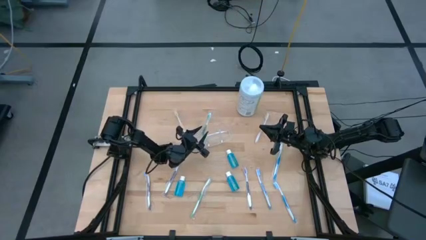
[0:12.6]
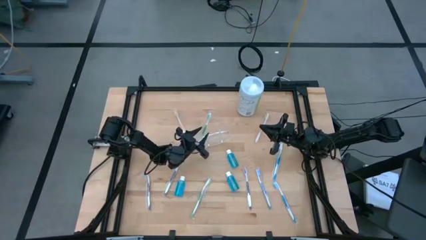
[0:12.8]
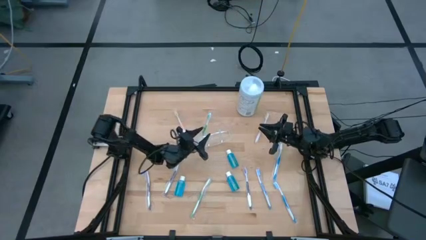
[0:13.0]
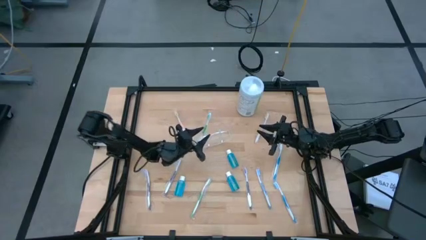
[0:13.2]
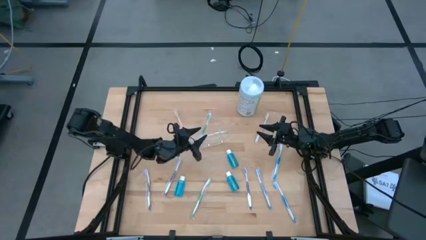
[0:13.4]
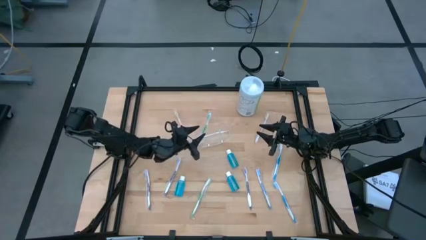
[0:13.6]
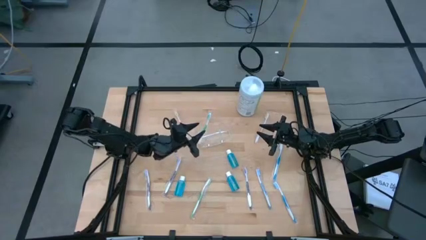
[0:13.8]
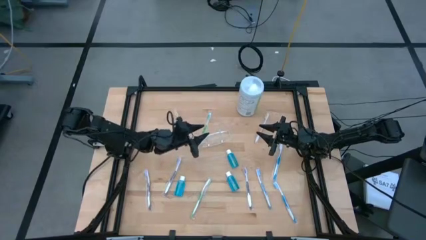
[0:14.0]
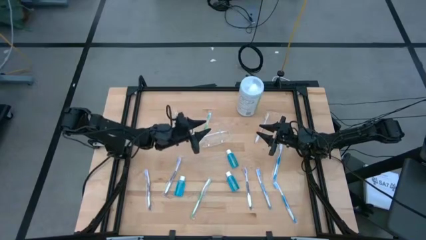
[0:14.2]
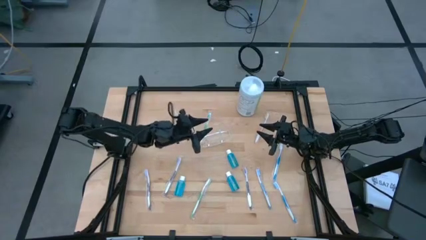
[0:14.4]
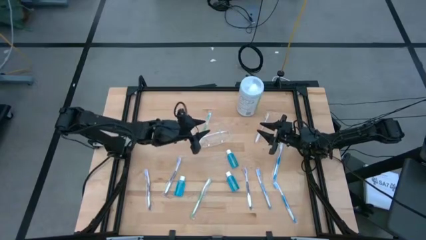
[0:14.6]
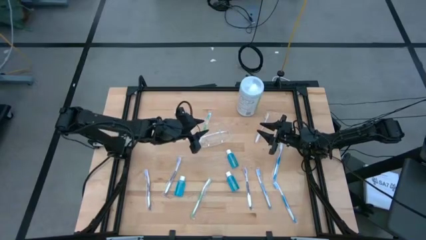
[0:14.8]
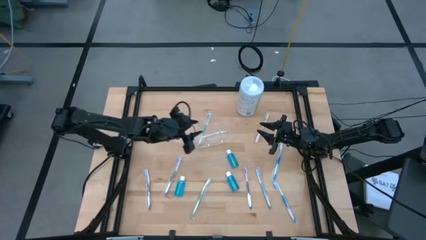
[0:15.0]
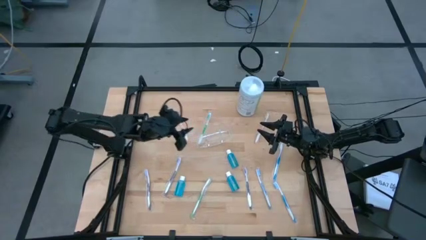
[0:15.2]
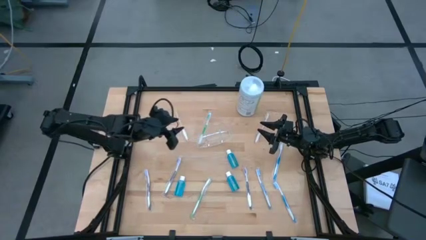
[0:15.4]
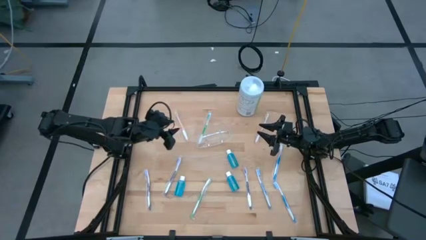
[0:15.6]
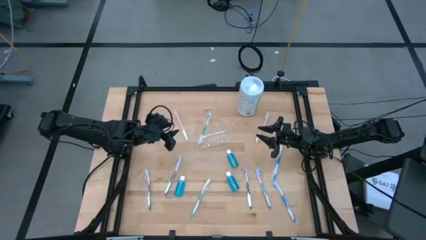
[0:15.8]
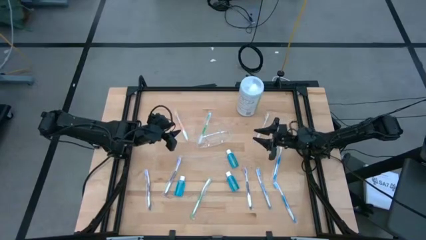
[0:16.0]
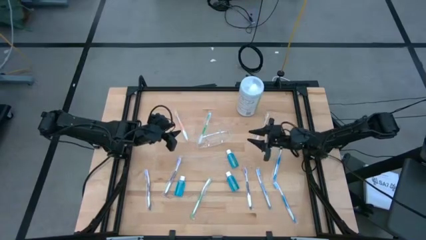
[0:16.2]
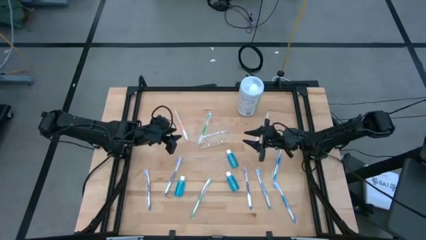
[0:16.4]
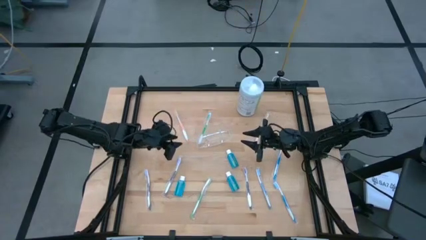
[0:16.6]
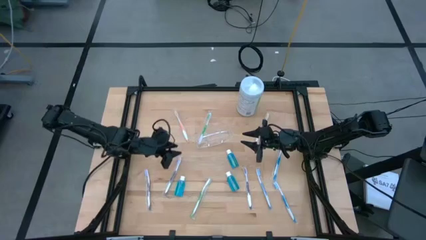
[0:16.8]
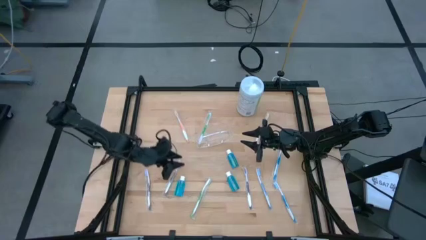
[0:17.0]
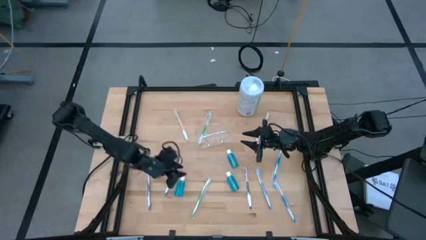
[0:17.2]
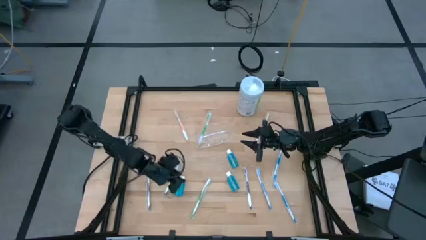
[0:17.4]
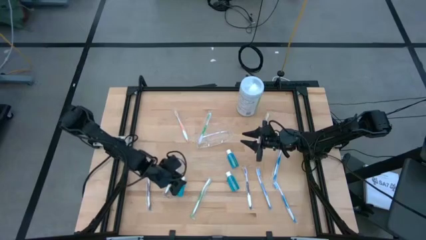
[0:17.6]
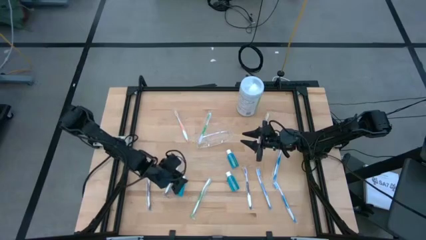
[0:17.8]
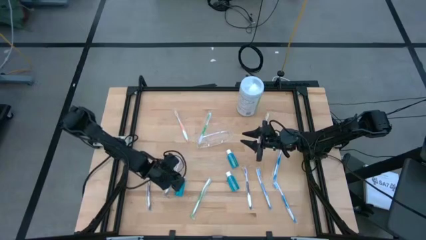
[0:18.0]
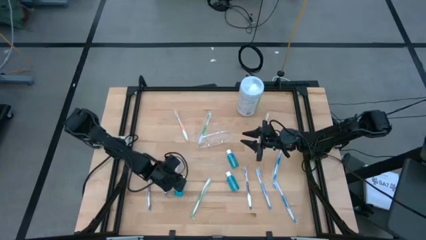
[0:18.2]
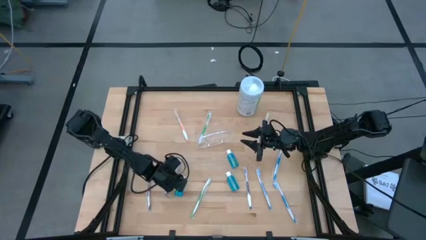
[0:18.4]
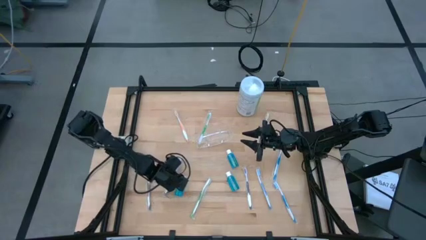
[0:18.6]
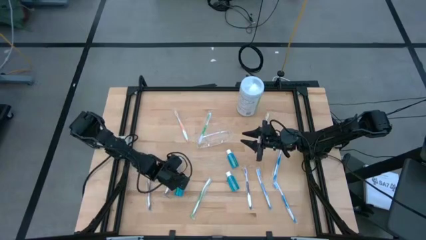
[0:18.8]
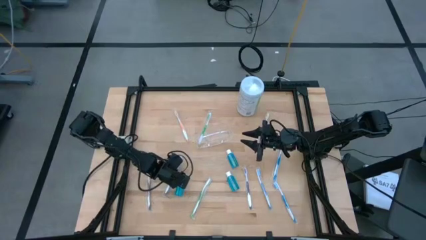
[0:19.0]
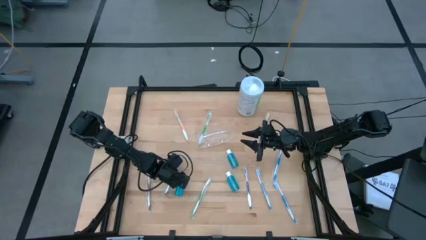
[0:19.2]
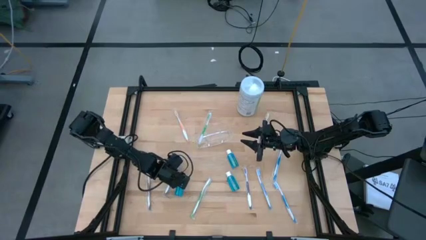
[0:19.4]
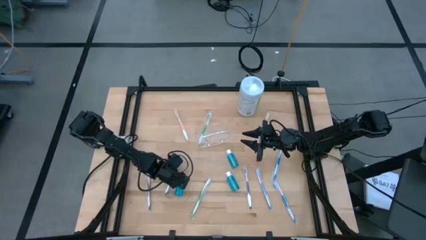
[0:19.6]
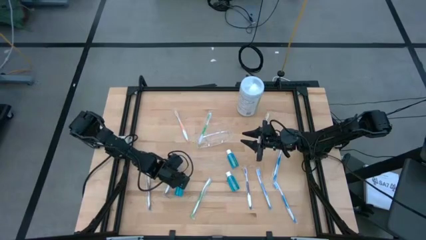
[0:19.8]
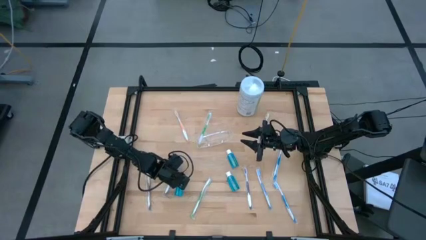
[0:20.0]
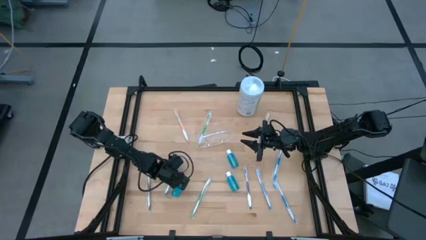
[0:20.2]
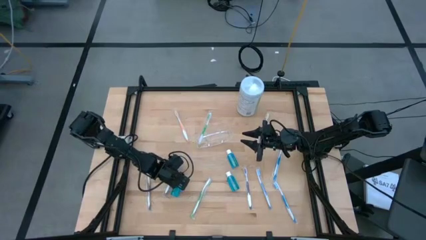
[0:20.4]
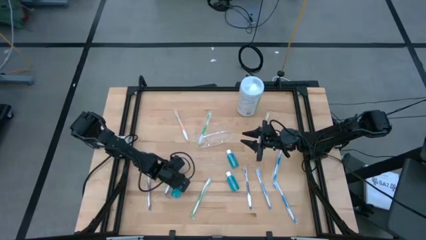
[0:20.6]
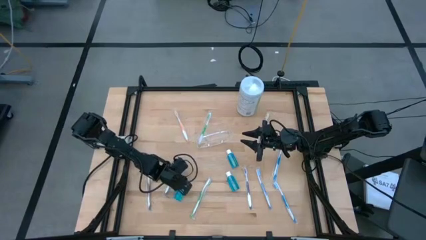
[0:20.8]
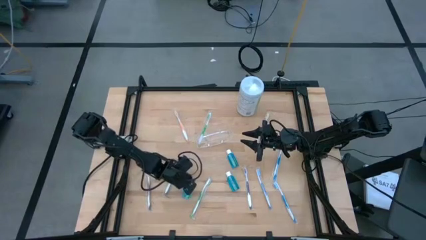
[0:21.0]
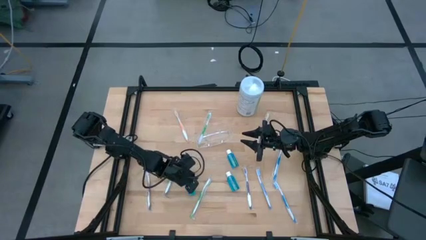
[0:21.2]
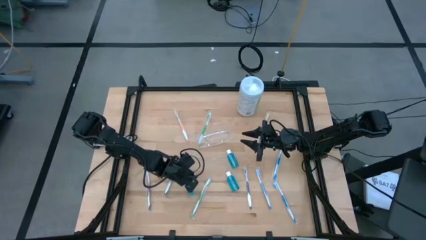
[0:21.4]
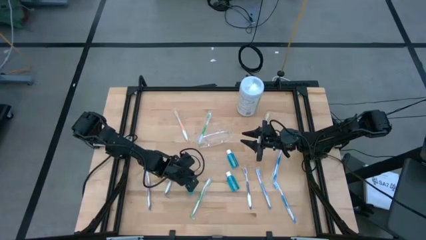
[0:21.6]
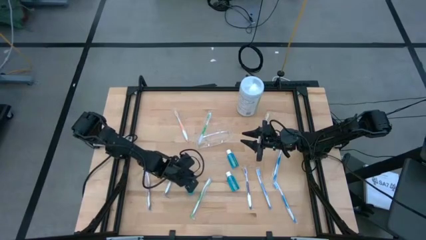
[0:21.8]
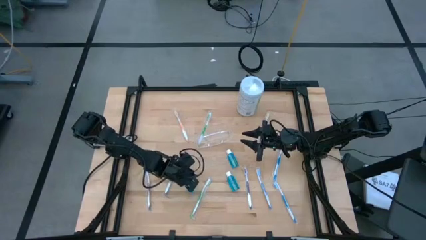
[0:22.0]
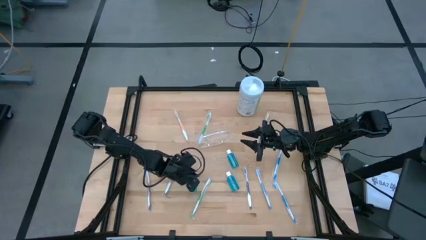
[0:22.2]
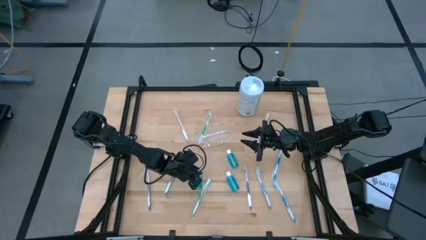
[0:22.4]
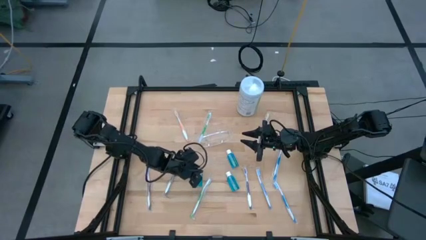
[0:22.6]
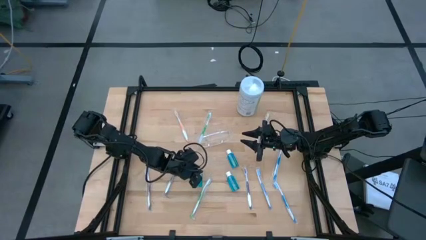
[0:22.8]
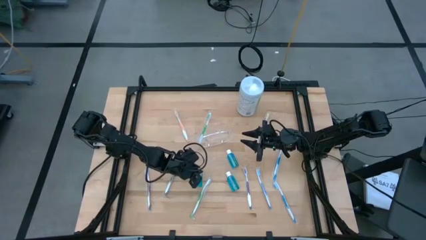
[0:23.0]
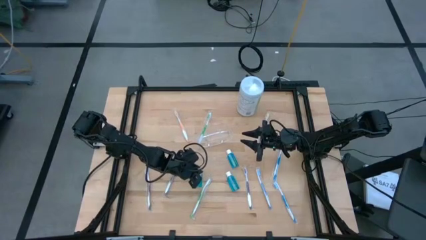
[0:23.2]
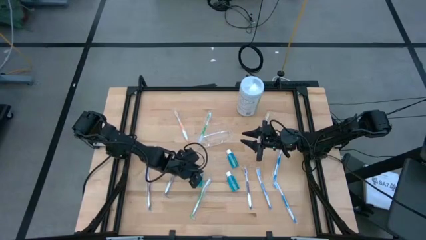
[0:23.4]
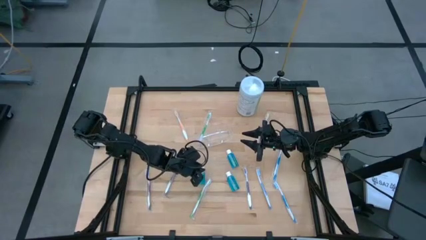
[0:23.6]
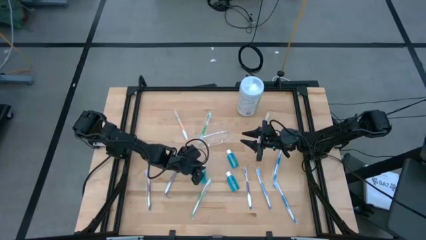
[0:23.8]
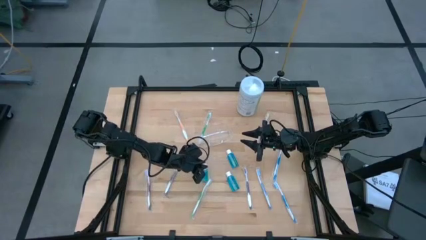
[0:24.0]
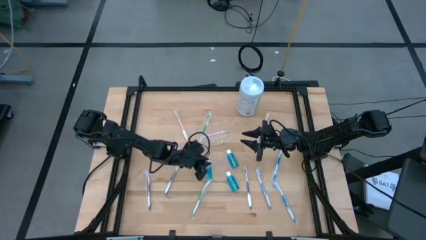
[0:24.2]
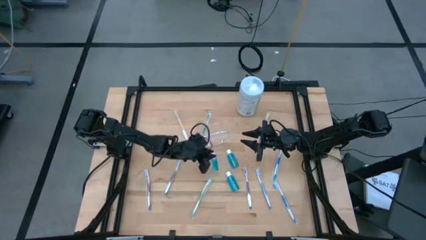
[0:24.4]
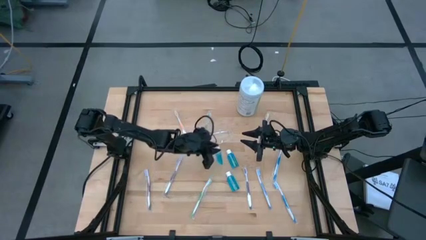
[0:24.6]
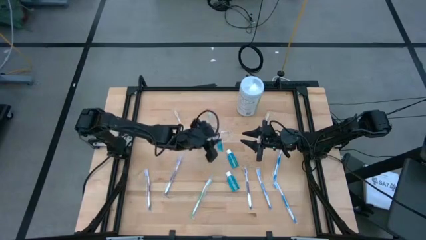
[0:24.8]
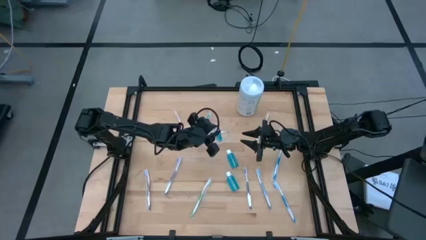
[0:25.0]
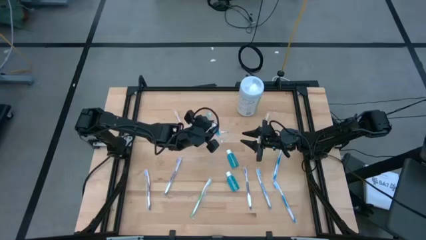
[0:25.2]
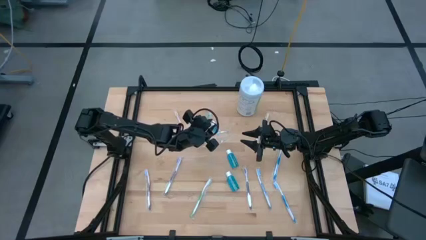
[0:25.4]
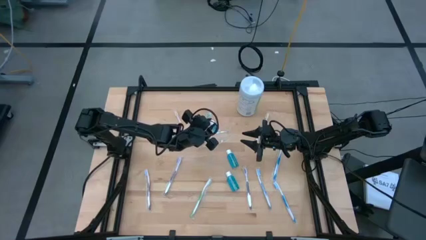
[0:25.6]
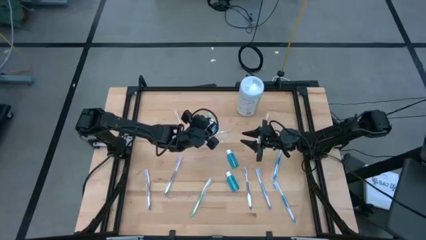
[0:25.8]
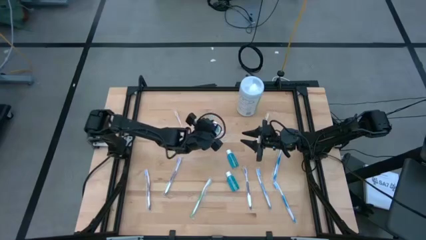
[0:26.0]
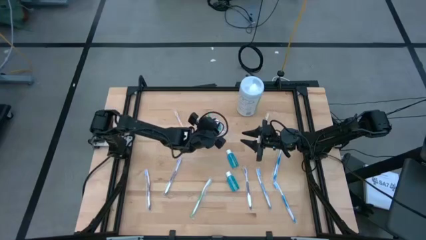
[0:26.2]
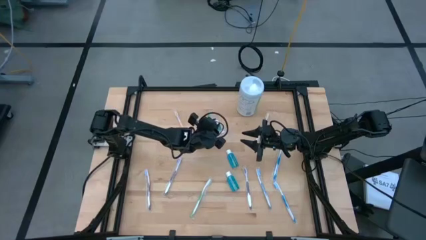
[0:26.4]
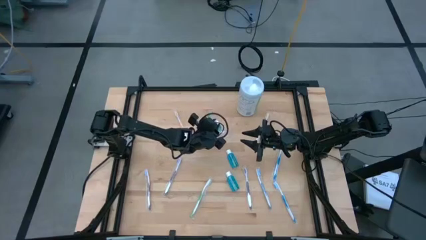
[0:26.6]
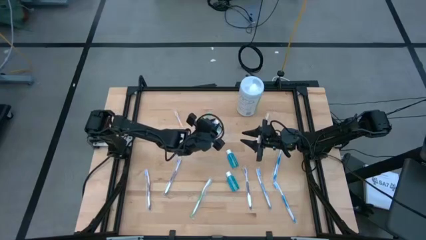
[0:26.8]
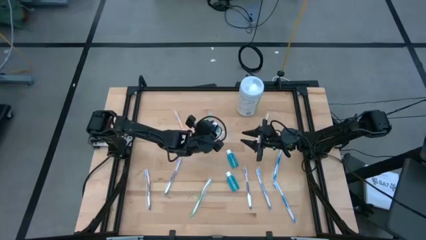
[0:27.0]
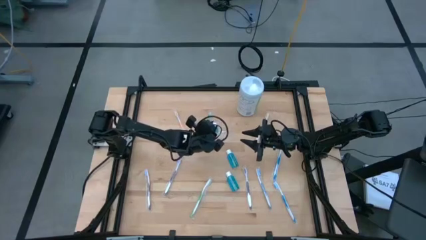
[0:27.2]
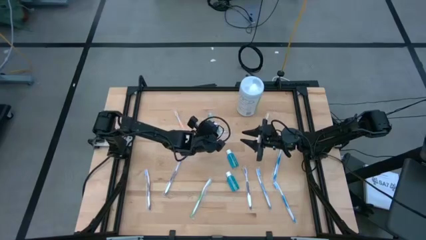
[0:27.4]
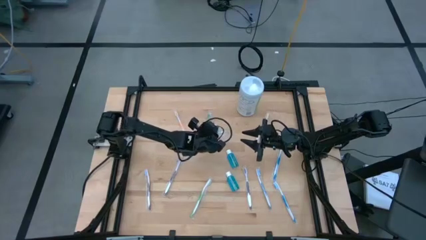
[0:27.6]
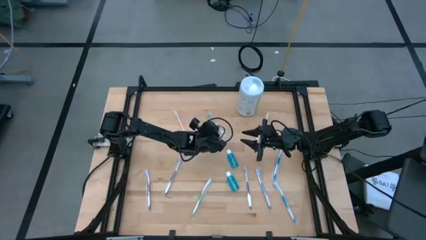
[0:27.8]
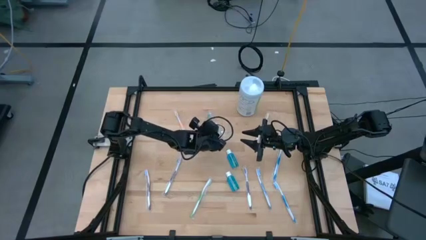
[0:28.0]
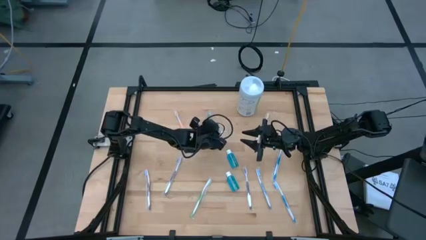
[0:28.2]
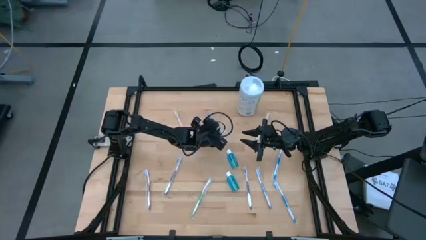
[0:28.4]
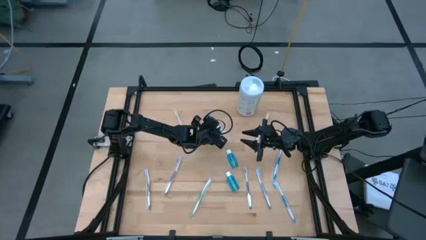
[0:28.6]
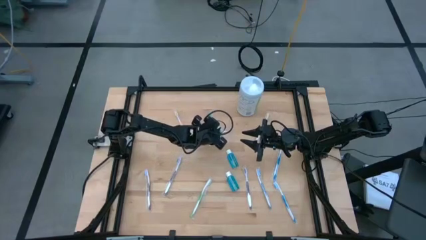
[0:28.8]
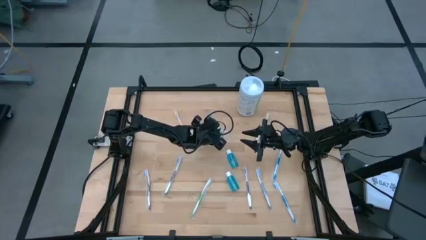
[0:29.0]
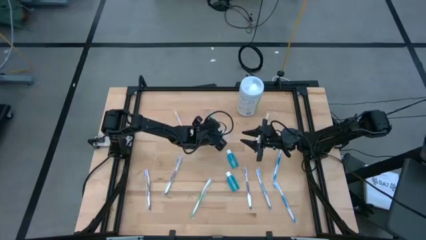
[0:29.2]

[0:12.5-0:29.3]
Task: Pick & Place toothbrushing station
Put the left blue mouthwash into the transparent organizer
